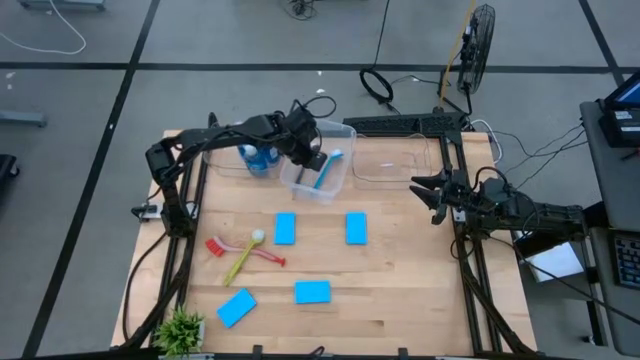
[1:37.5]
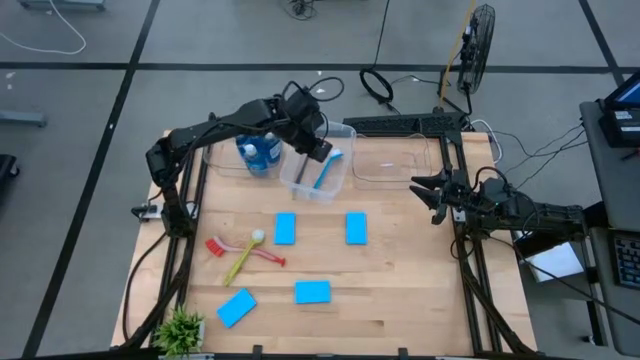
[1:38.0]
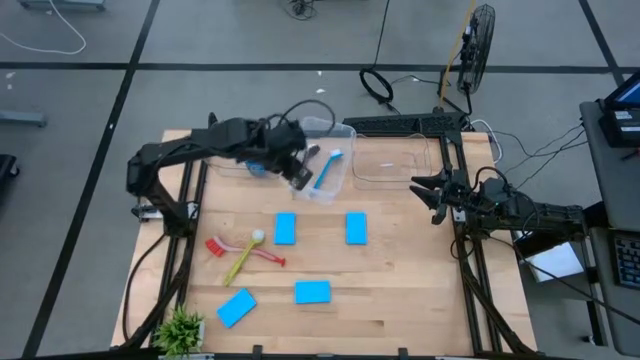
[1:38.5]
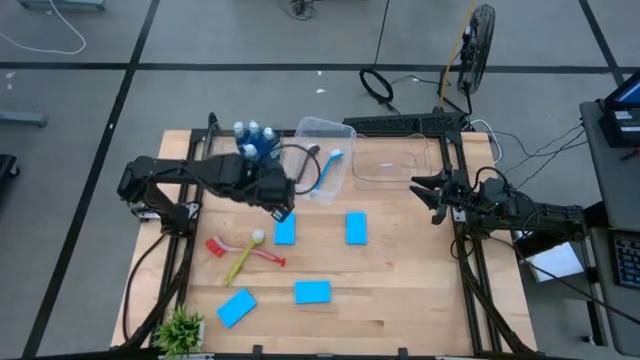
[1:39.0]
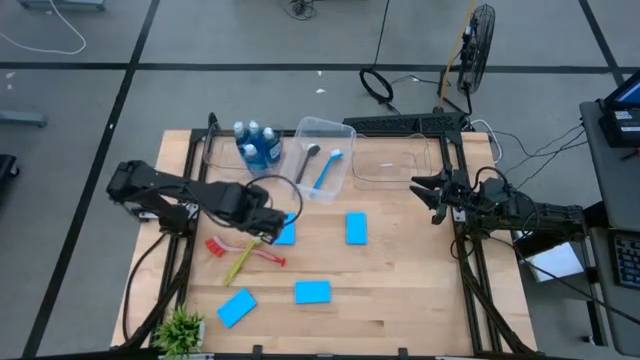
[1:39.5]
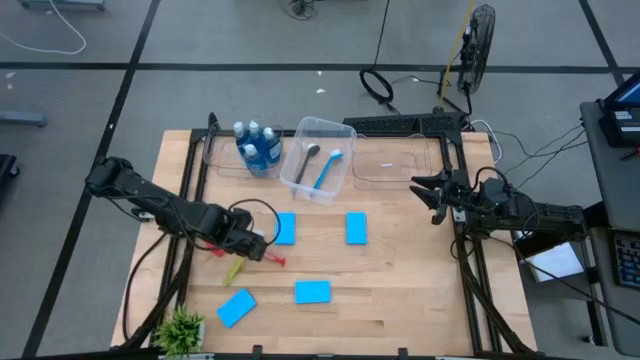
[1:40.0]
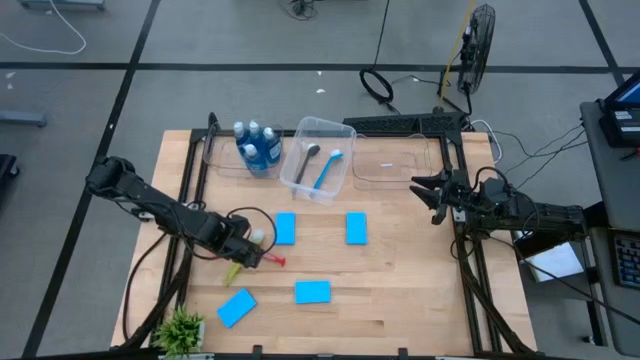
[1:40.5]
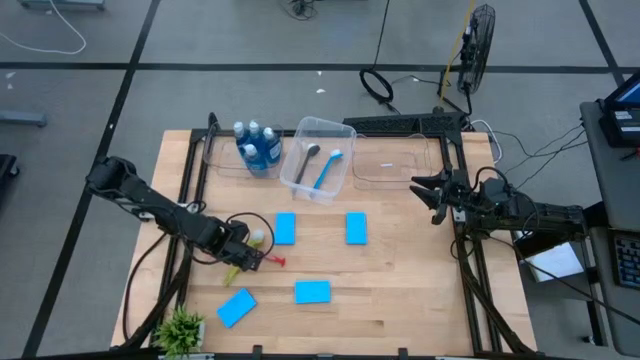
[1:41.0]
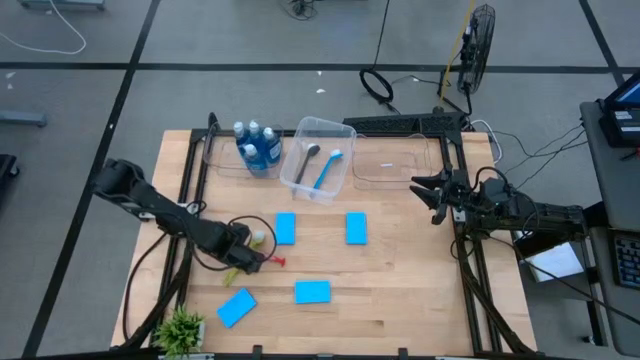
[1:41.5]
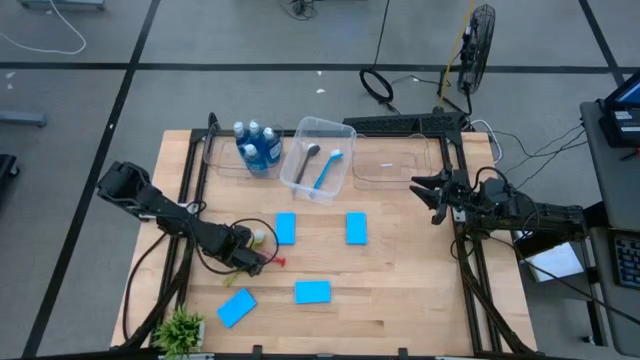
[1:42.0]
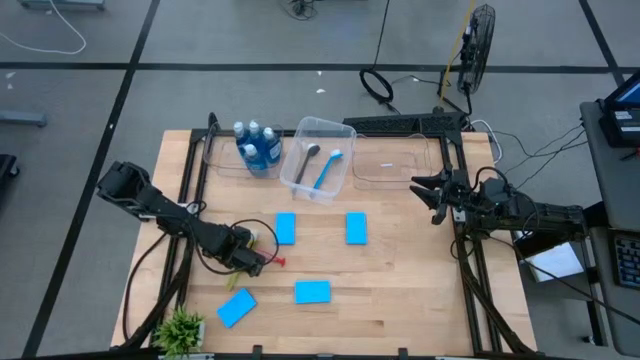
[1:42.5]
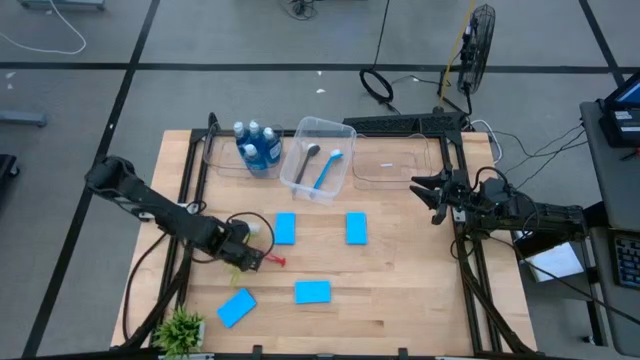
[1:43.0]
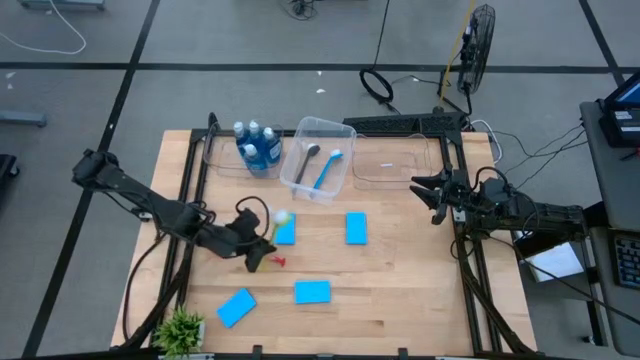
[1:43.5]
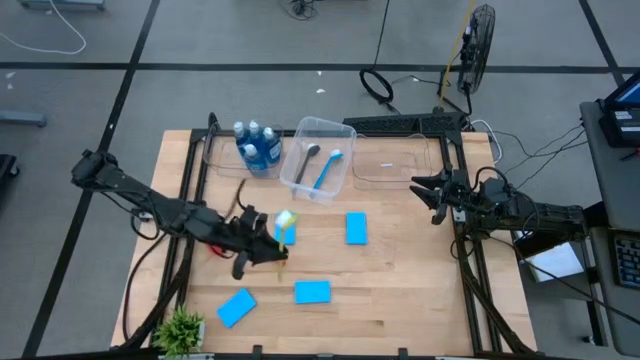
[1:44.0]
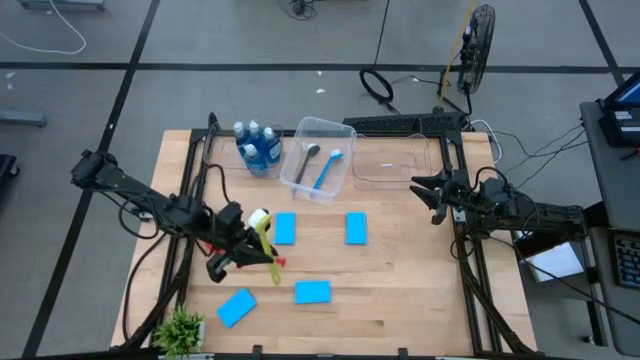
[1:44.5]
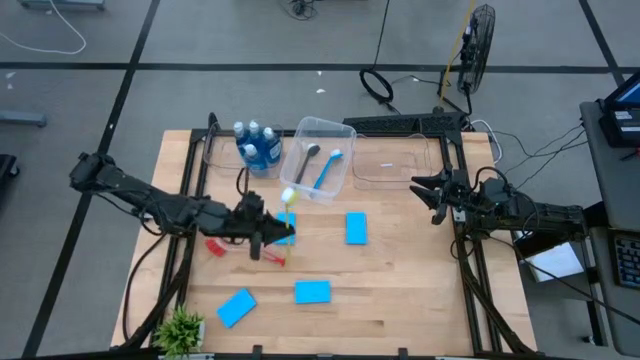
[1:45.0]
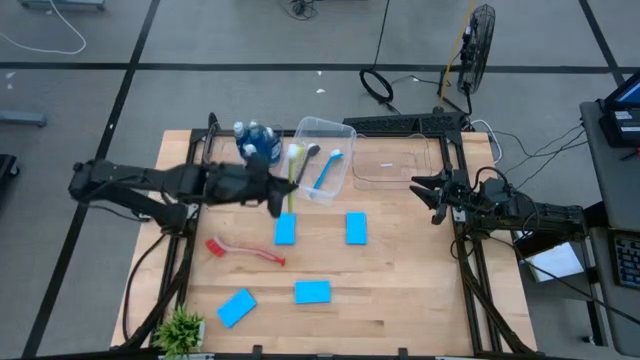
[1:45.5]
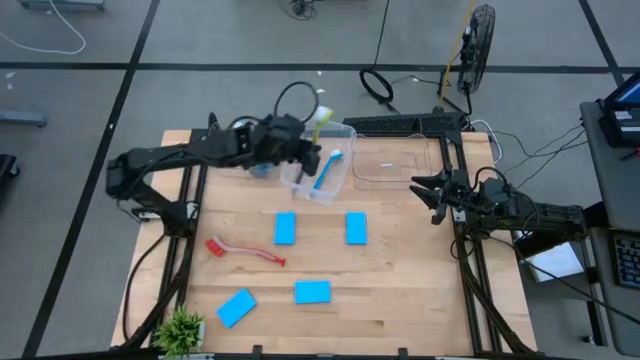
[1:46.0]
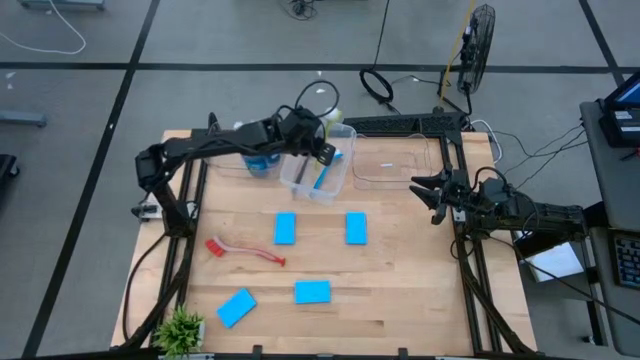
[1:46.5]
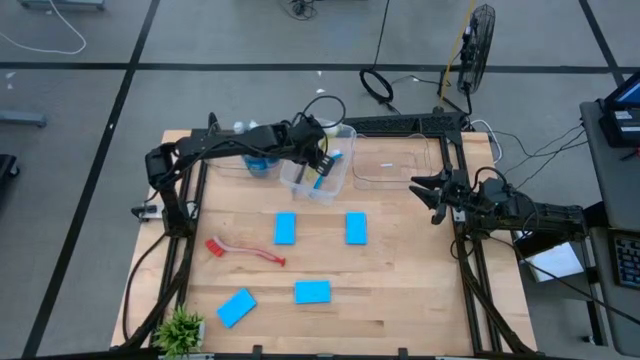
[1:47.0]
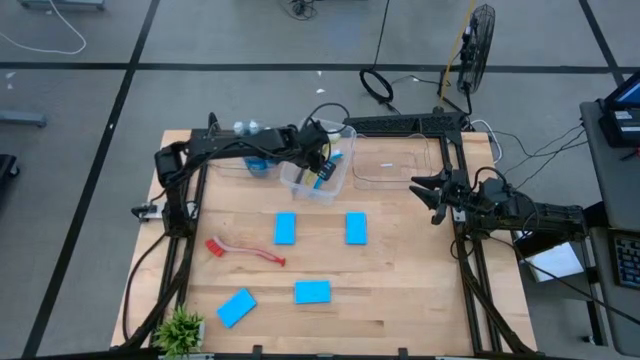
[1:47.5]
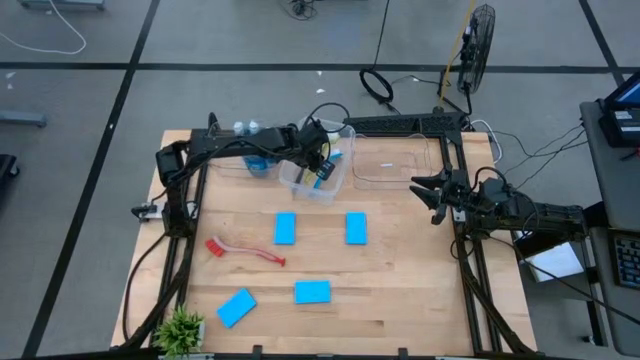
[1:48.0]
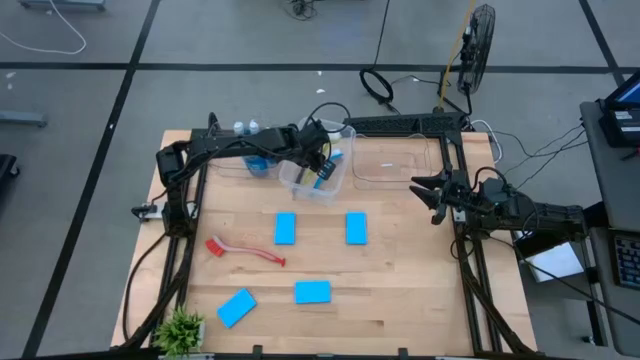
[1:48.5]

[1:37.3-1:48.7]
Task: Pick & Place Kitchen Sink Supplies
Put the green dish brush into the transparent container

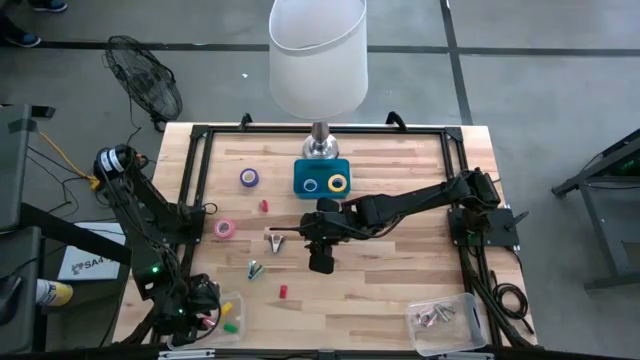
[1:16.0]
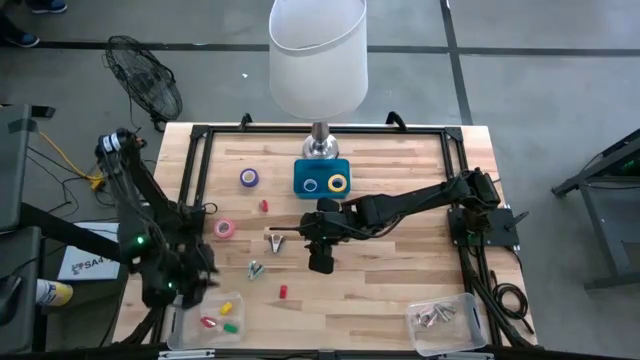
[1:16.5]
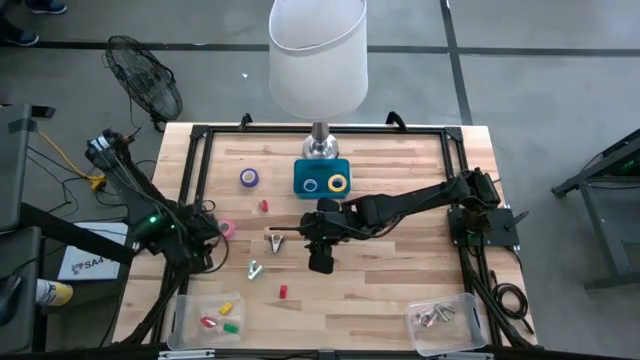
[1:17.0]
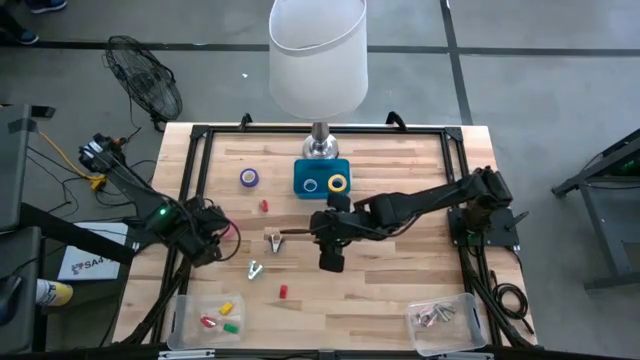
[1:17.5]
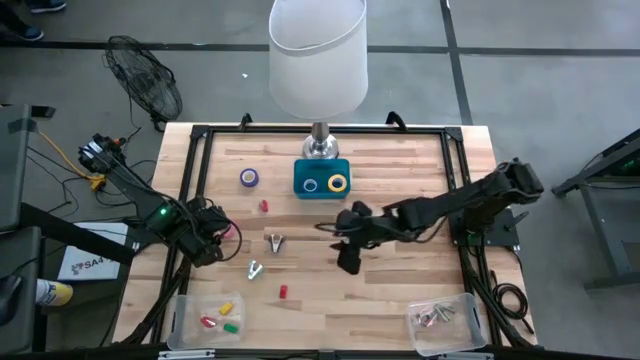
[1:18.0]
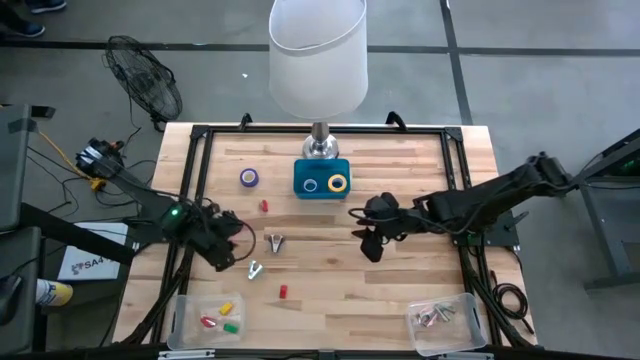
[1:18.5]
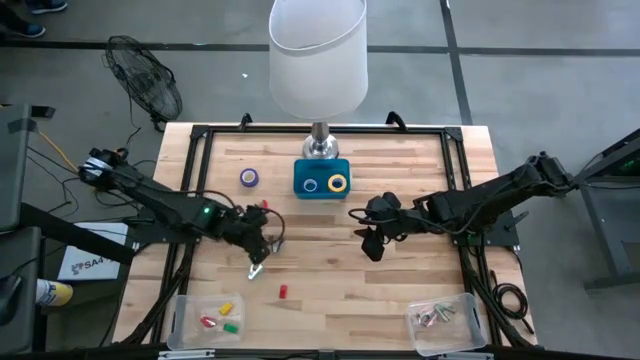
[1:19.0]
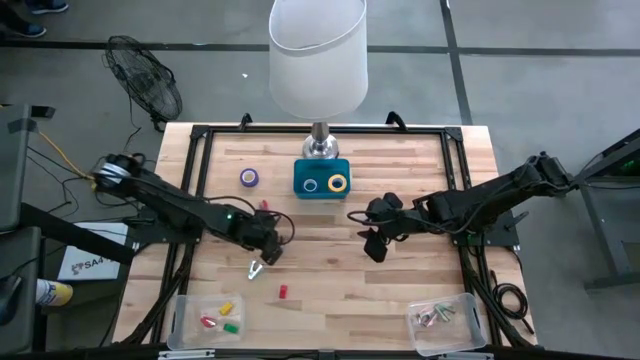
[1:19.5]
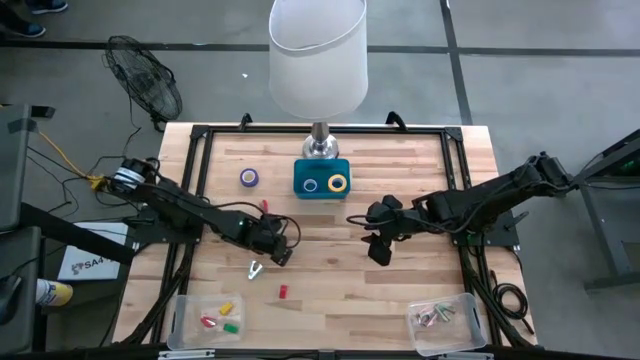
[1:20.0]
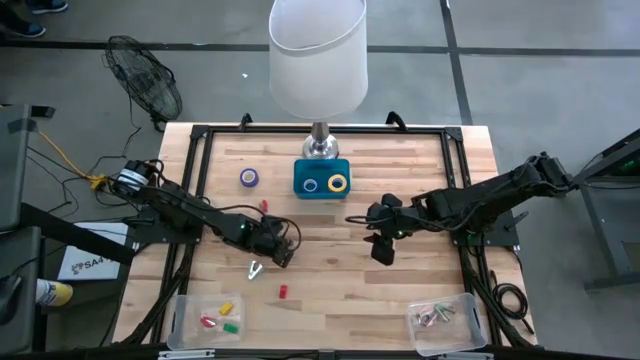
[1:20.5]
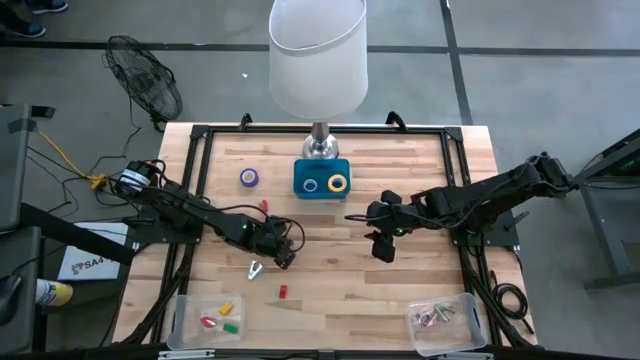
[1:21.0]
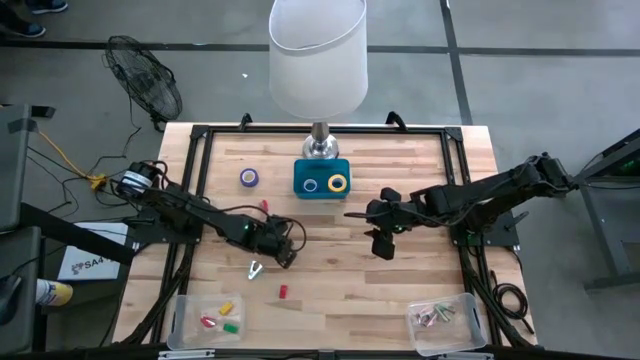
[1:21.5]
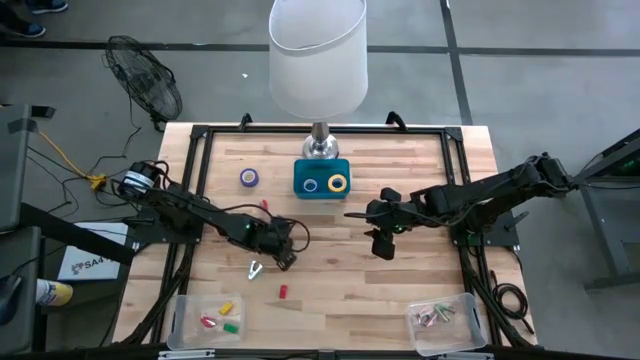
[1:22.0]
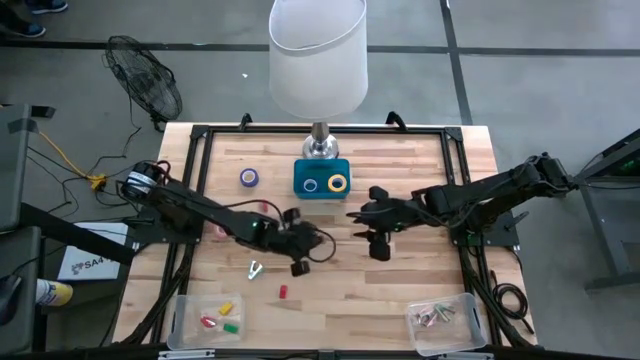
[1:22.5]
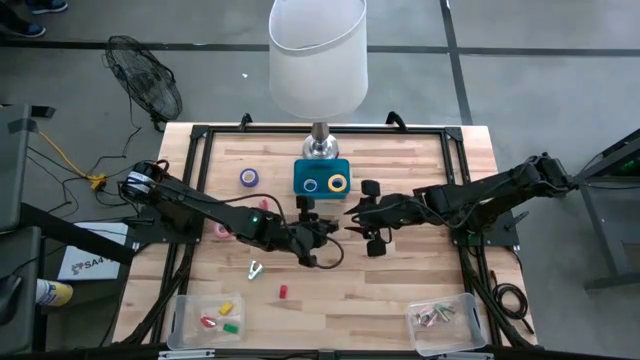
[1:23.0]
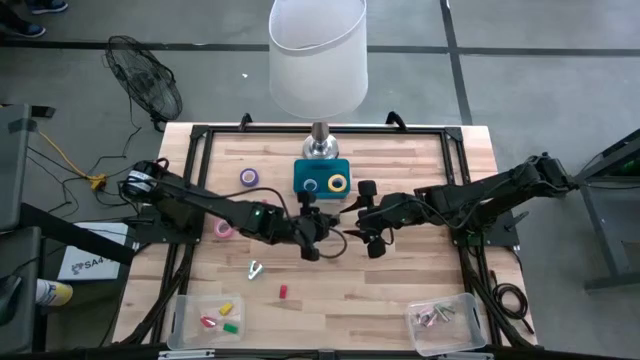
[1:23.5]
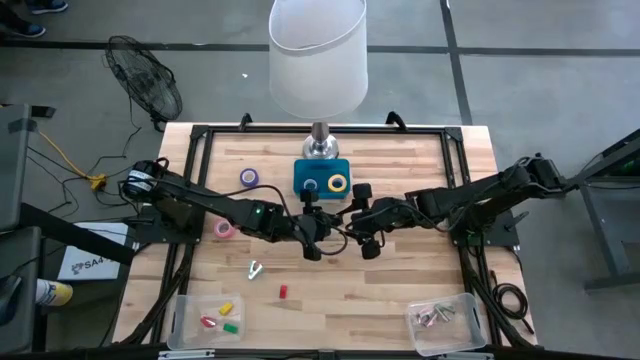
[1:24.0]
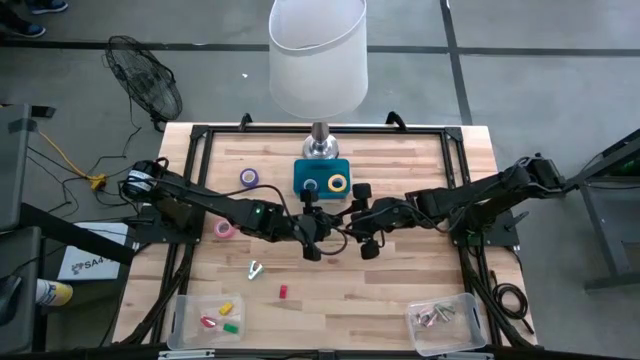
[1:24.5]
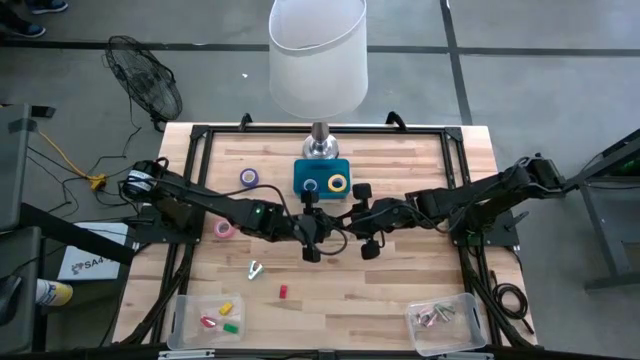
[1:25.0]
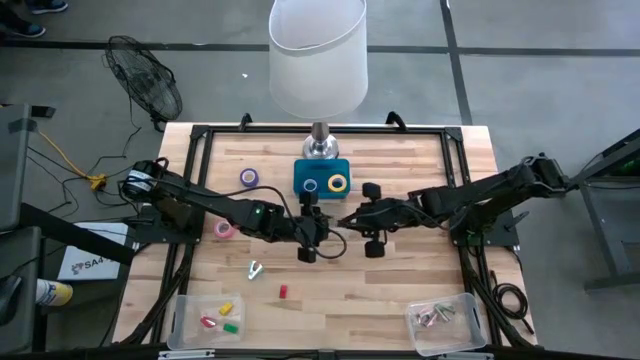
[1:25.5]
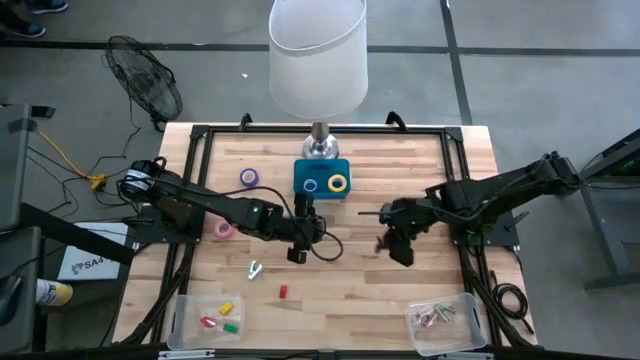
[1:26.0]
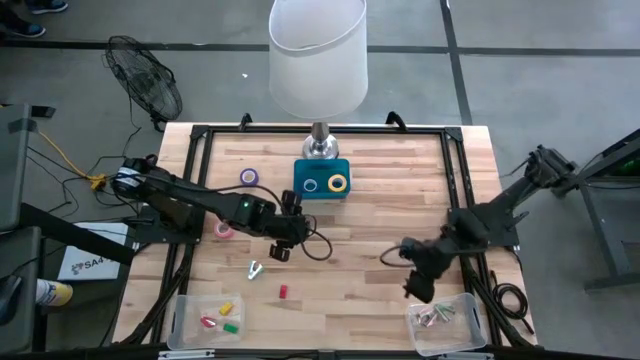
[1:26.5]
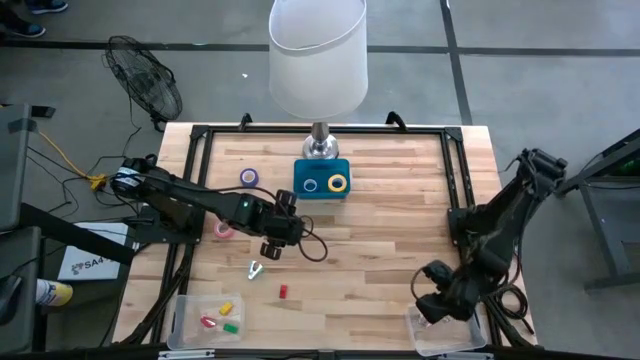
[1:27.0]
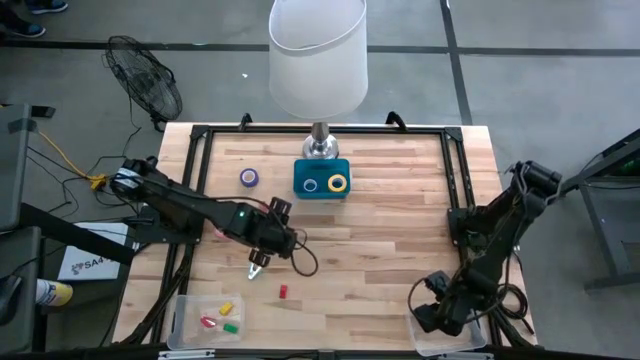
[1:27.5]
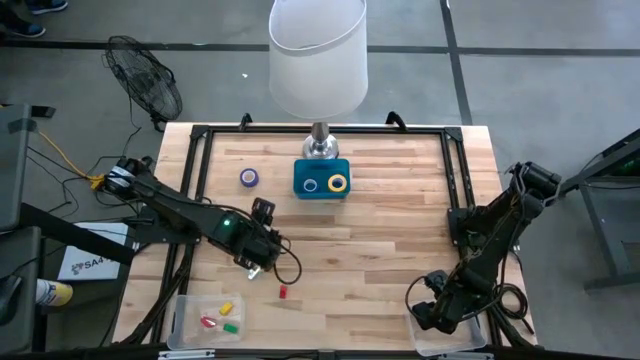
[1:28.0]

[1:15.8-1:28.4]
Task: Pick and place Stapler, Stapler remover, tape
Put the black staple remover into the right transparent bin
